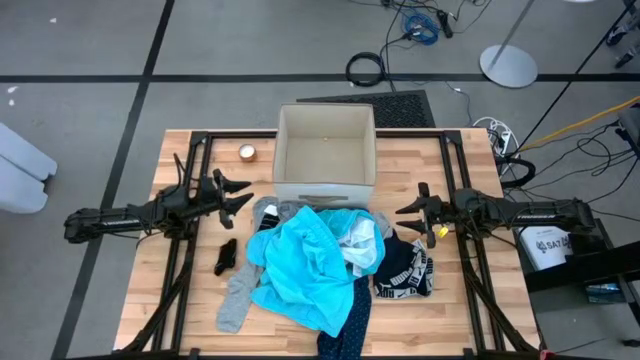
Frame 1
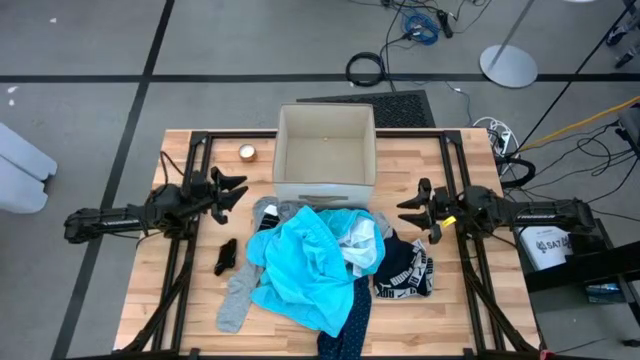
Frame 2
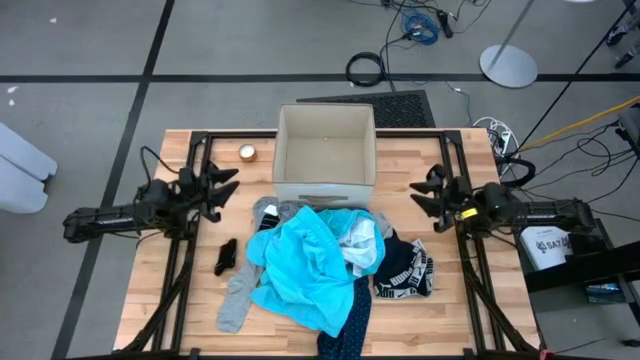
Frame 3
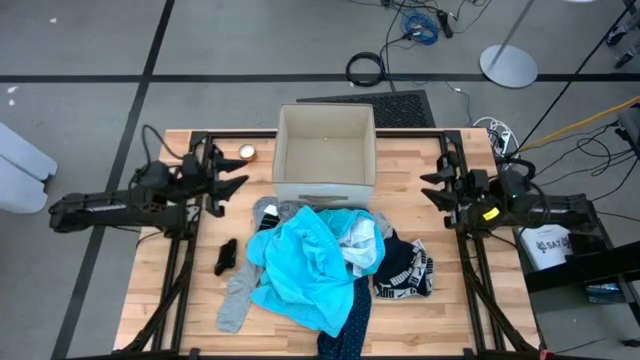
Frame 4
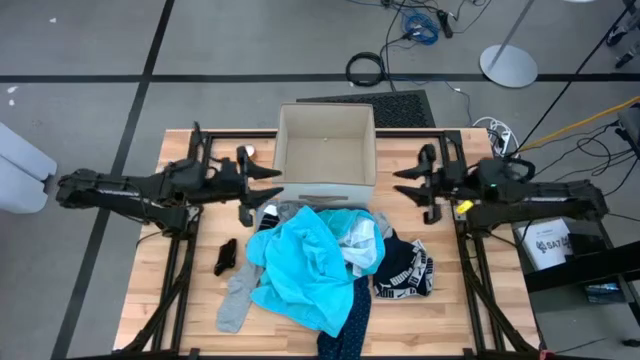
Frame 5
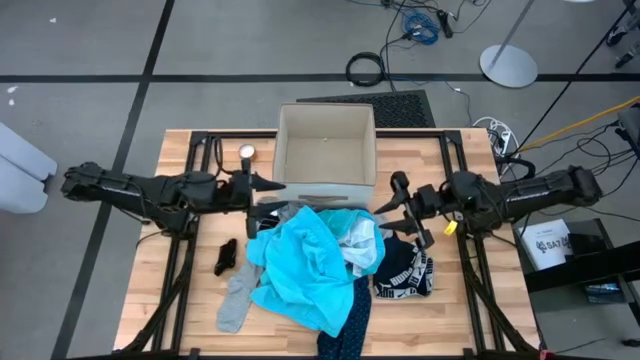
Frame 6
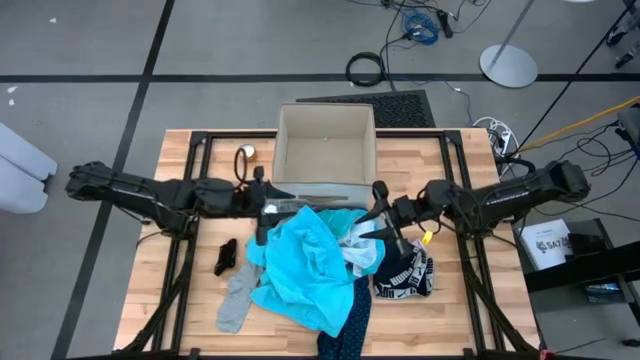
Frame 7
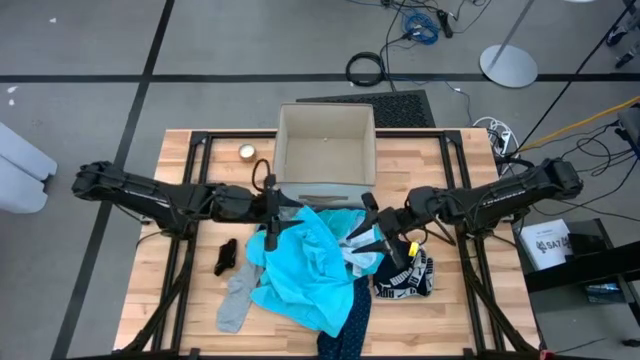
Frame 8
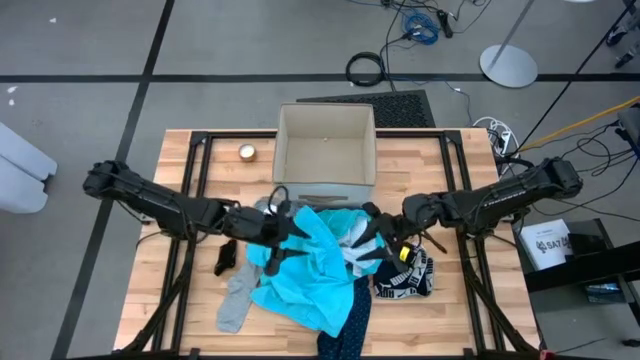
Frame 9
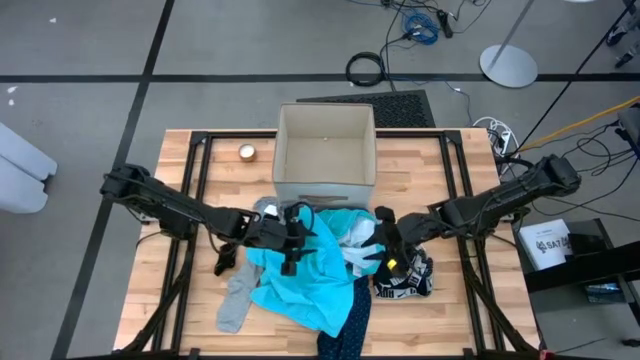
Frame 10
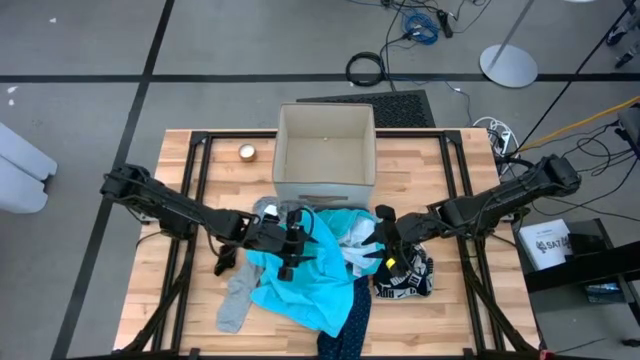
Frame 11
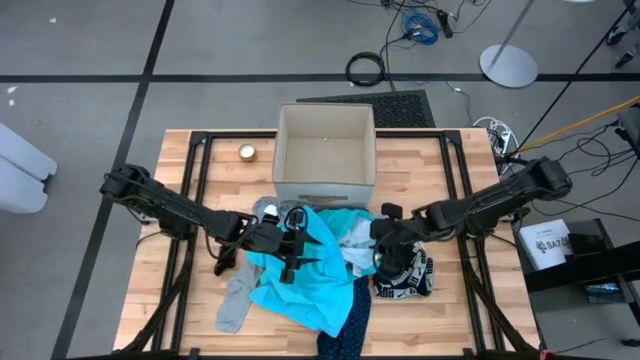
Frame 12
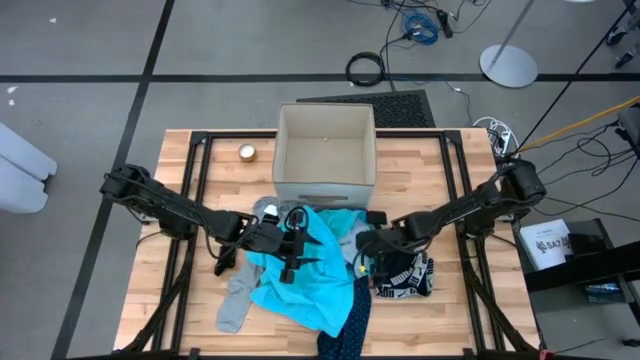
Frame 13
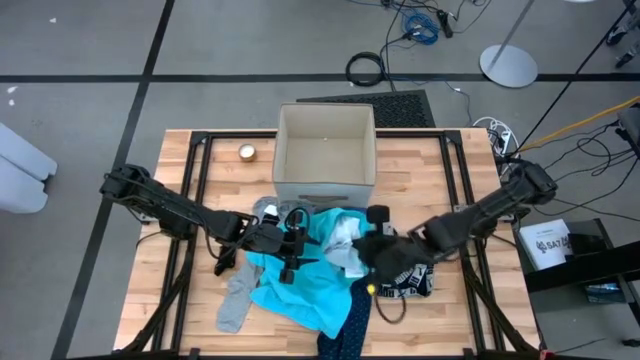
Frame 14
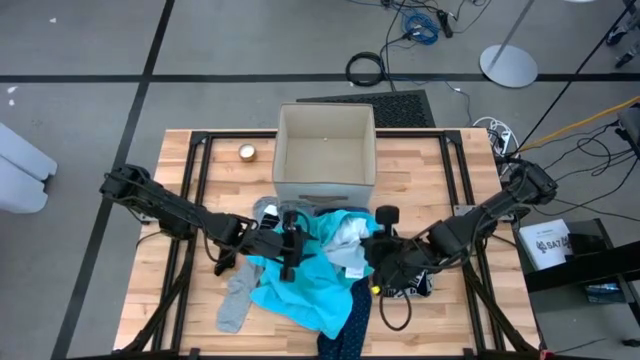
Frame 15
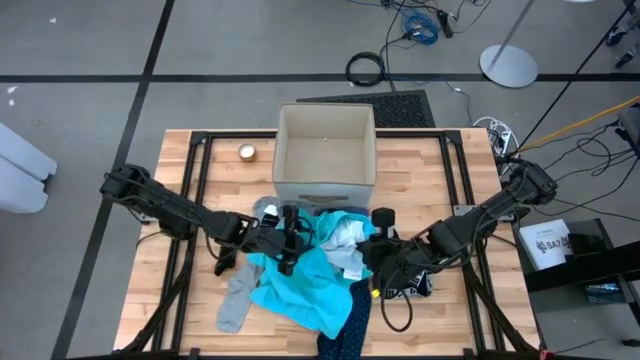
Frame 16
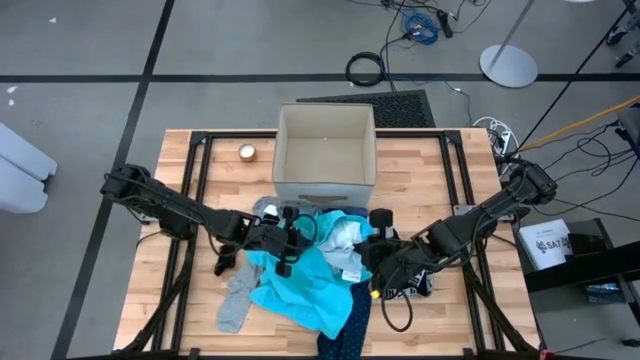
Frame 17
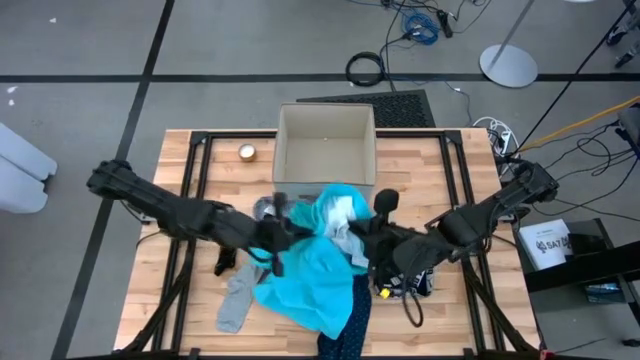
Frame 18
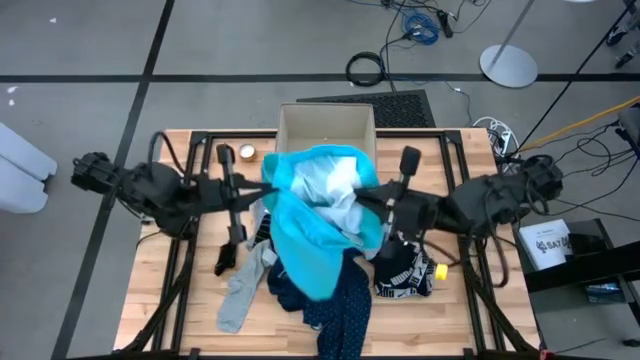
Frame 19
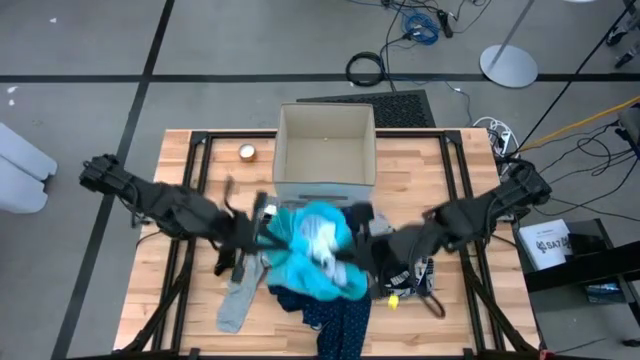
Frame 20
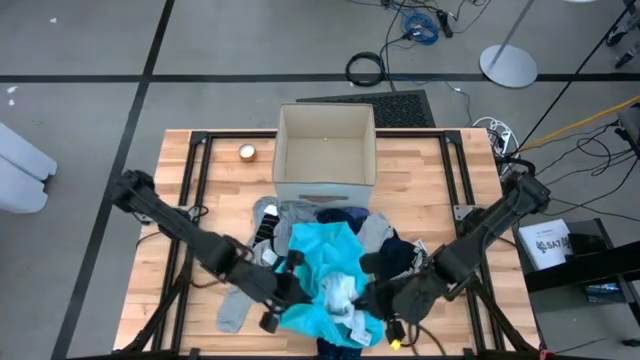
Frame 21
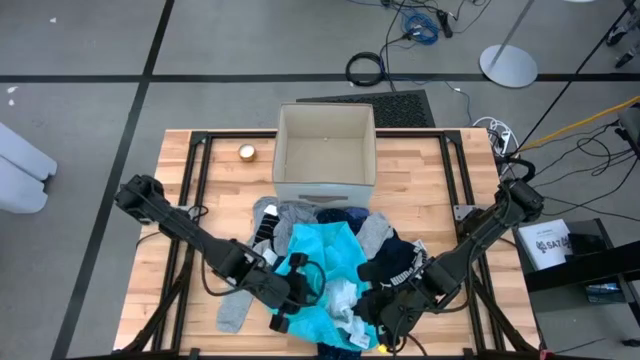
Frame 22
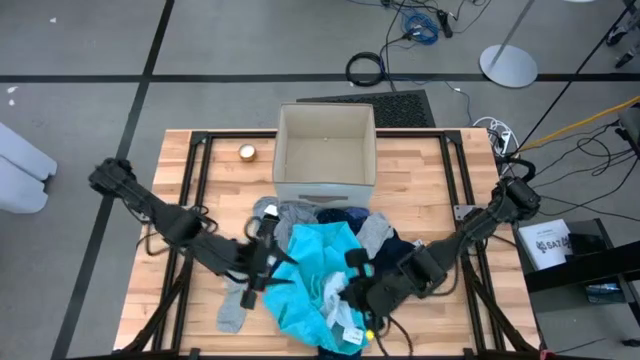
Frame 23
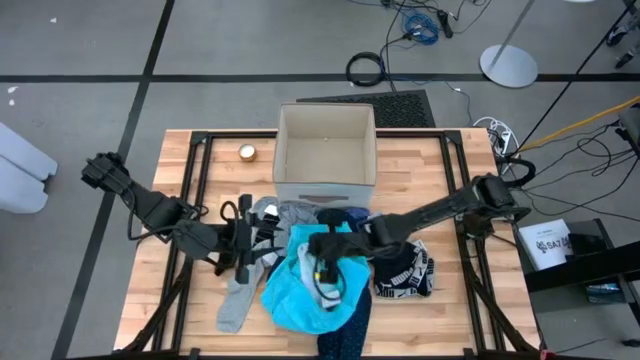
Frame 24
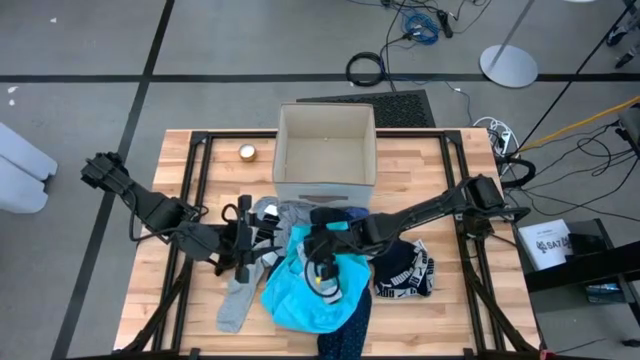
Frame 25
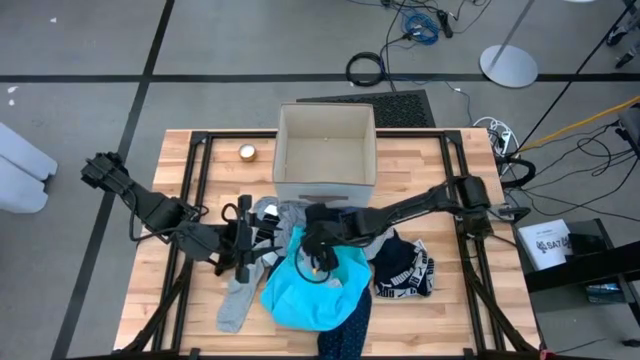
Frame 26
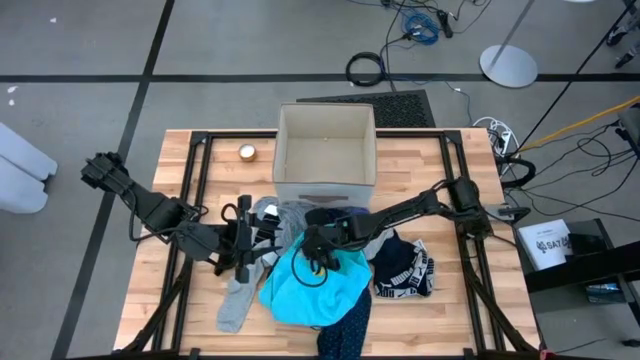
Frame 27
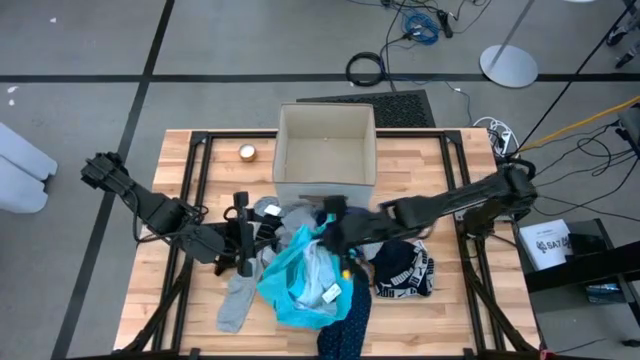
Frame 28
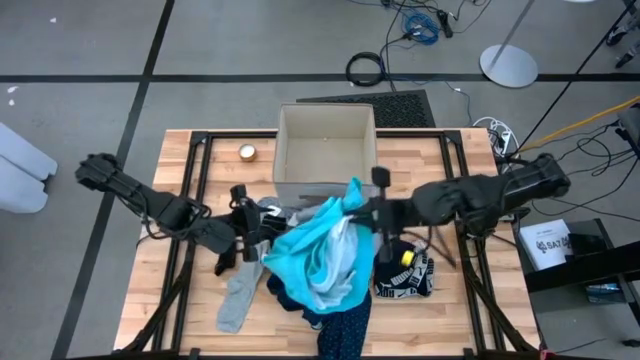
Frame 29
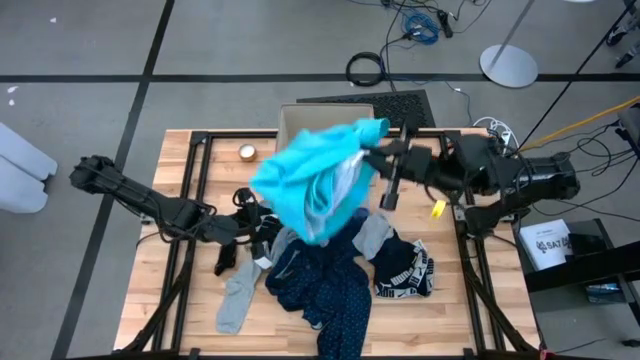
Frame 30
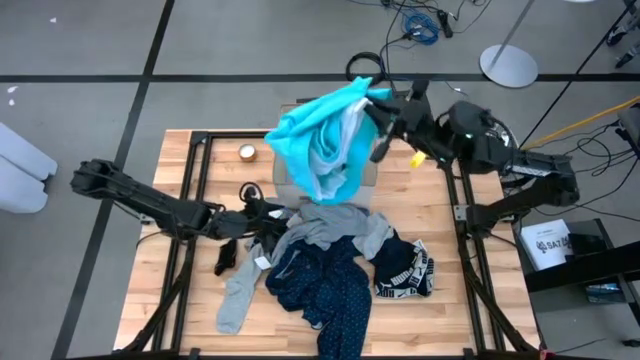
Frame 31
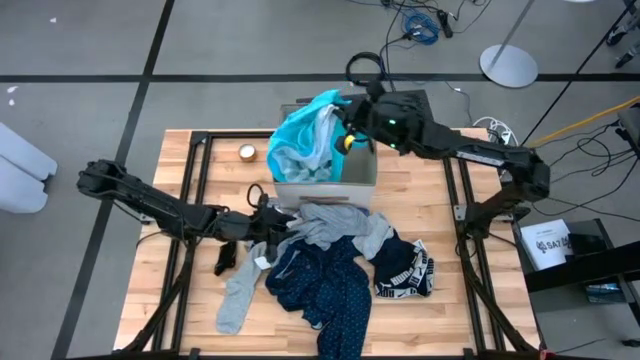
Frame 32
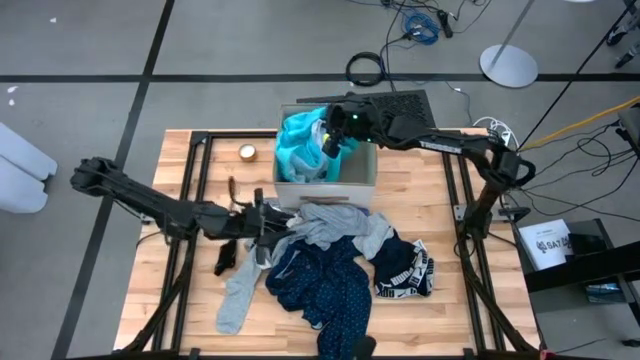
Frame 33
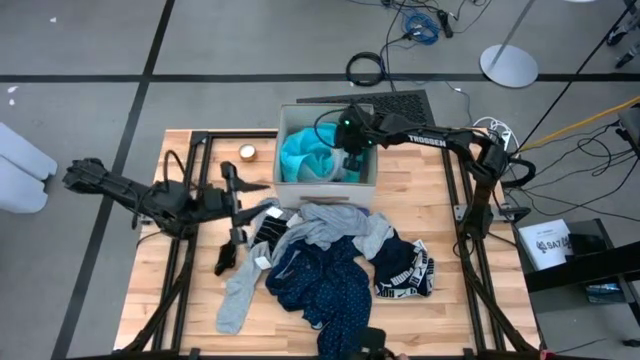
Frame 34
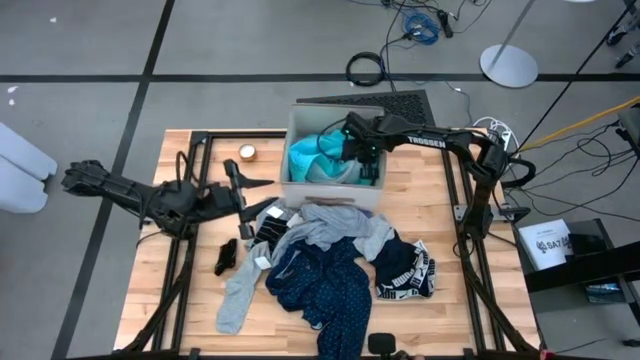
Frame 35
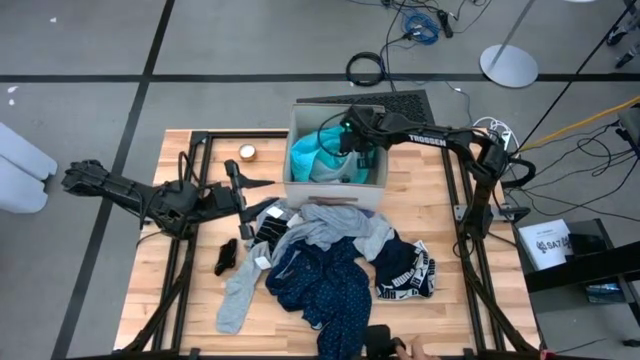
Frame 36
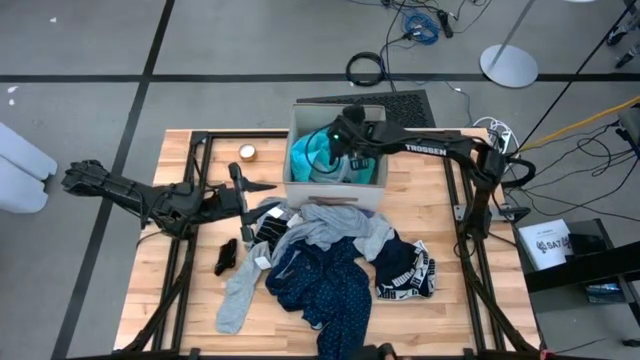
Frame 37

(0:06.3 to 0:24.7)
Task: Sort clothes
Put the blue shorts into the laundry organizer

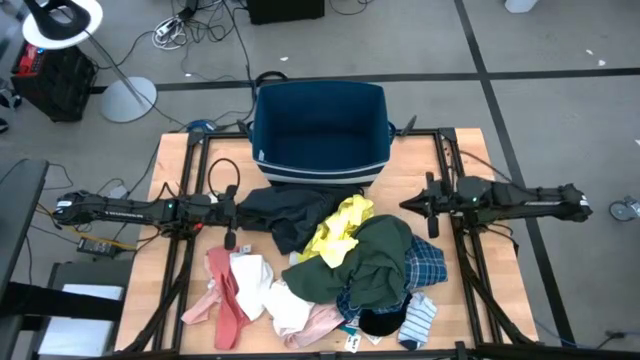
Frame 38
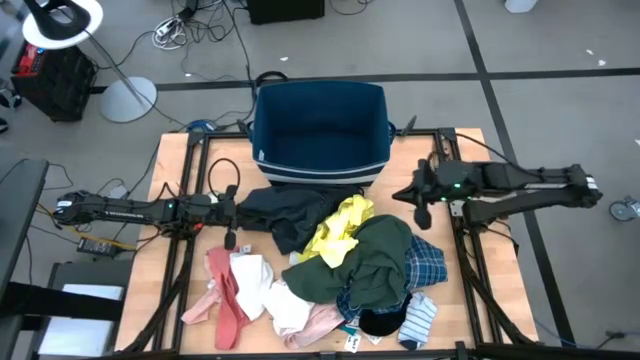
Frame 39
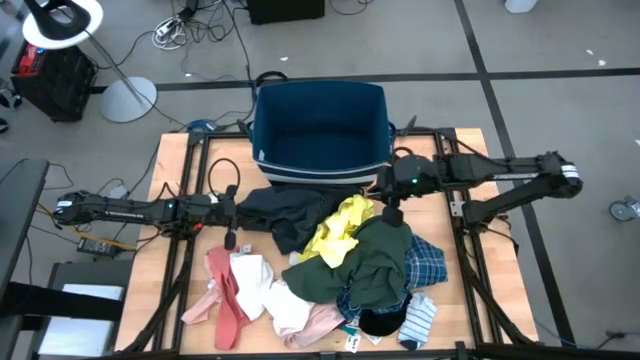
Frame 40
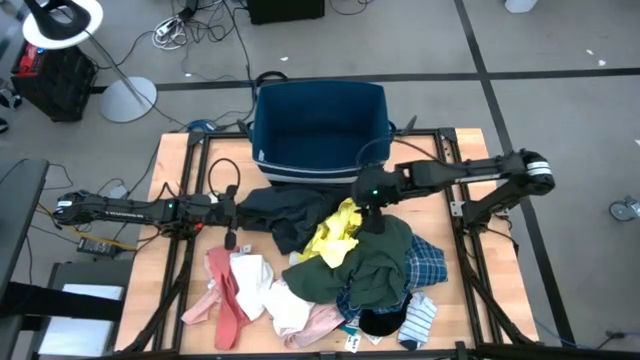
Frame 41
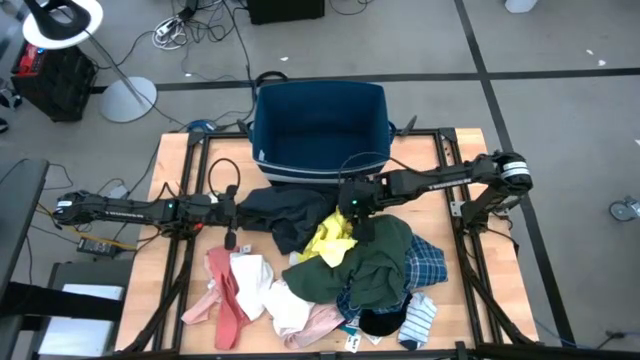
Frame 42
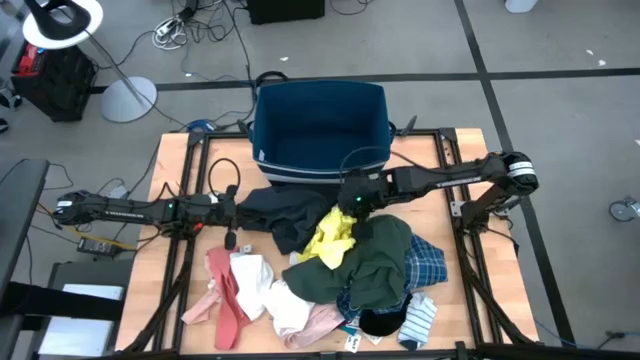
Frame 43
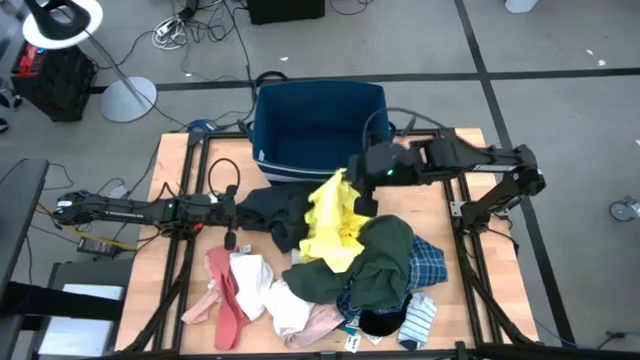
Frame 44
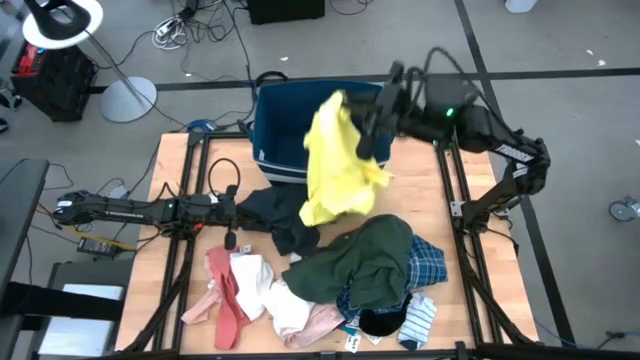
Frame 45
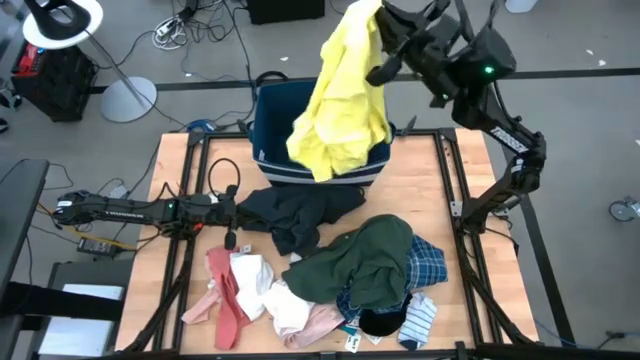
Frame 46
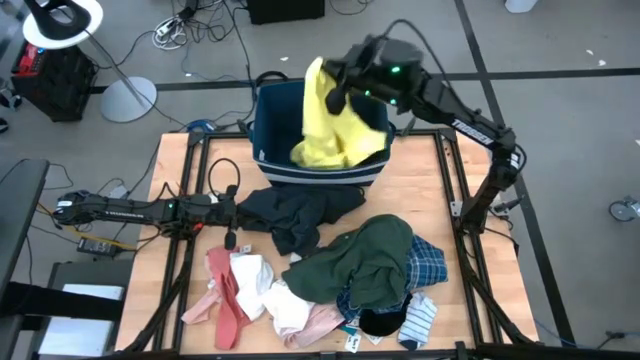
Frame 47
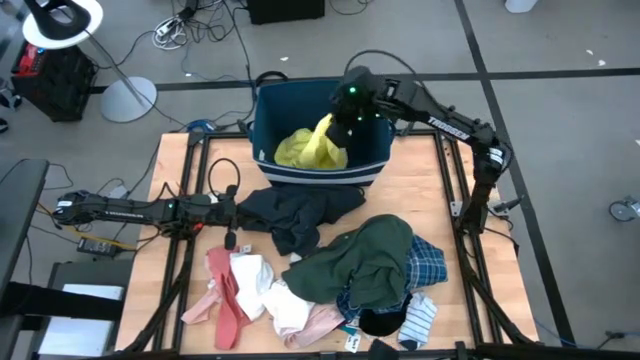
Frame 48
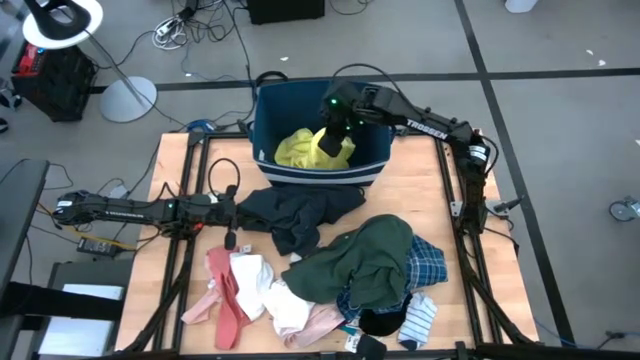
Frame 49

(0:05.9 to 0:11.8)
Task: Sort clothes
Put the yellow shirt into the blue laundry organizer
